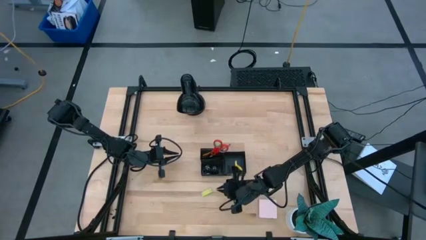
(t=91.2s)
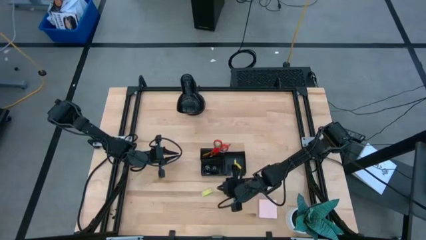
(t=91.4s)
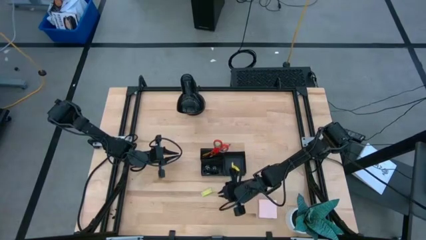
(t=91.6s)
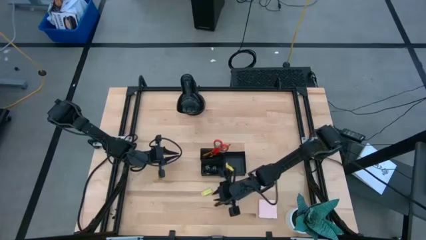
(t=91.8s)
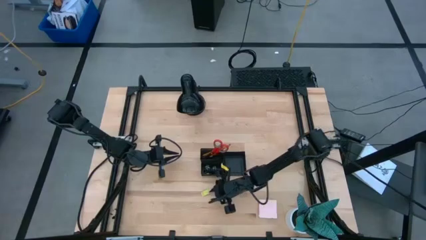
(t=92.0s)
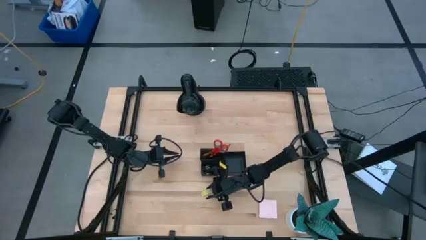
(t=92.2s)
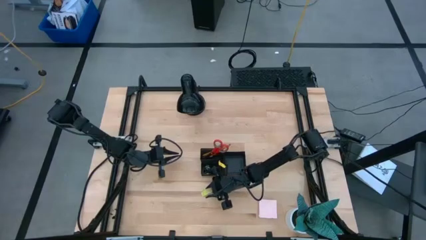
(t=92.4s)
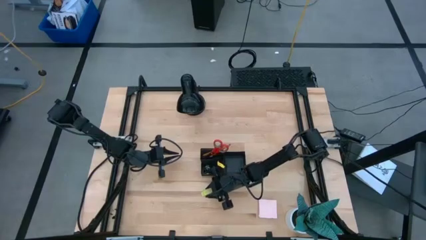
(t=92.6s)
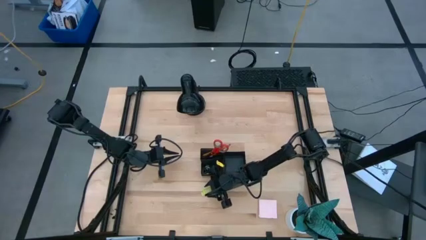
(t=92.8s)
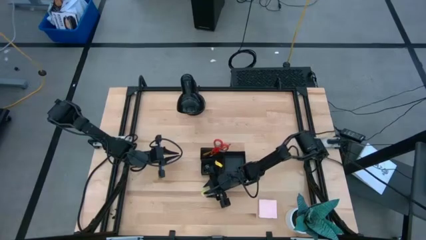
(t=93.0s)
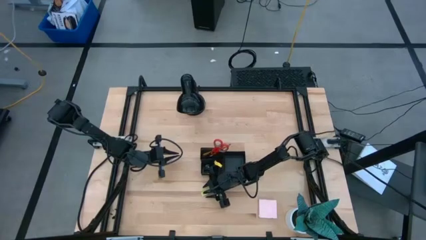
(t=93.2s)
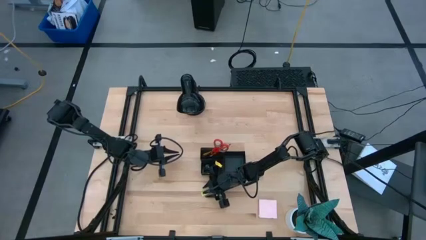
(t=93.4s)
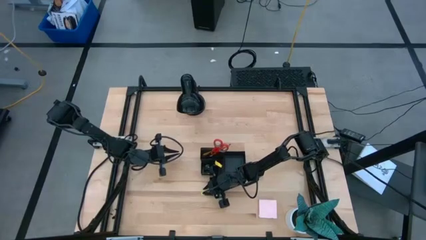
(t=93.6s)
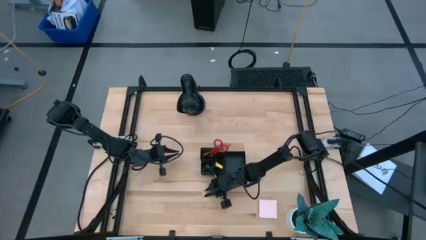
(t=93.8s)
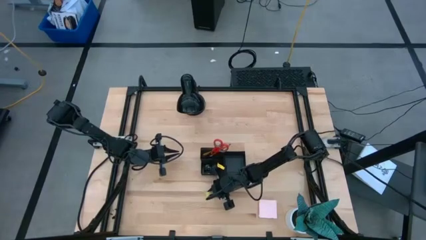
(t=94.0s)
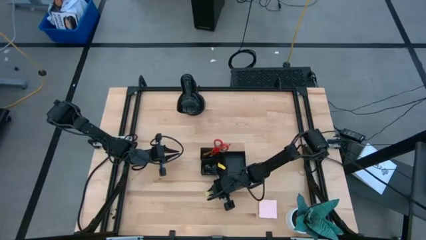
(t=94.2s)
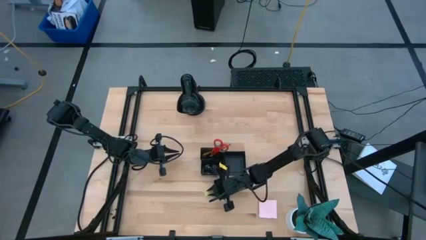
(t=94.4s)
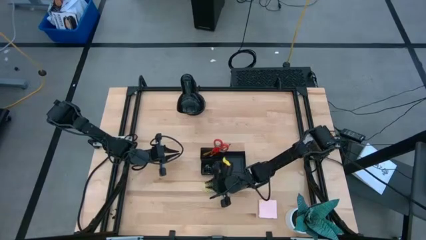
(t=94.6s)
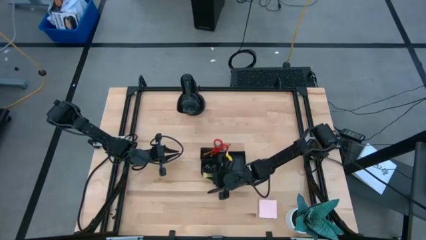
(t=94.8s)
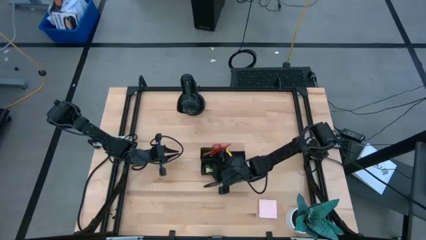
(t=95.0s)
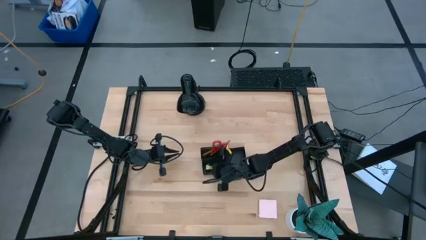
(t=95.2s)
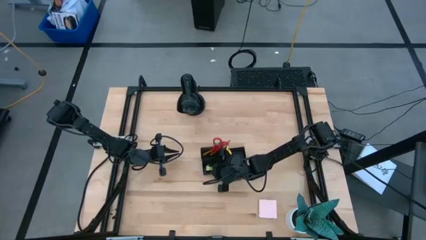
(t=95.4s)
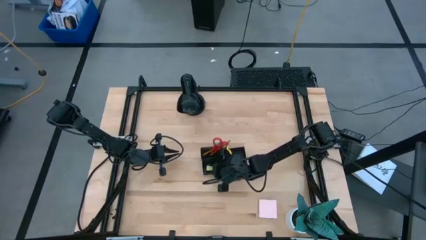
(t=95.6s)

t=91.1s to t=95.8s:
Task: Pick and place office supplies into organizer
Put the eraser into the organizer

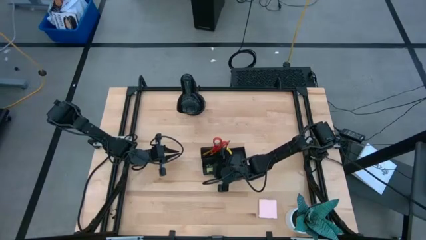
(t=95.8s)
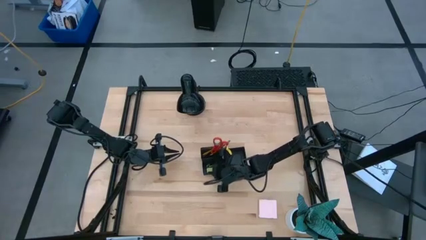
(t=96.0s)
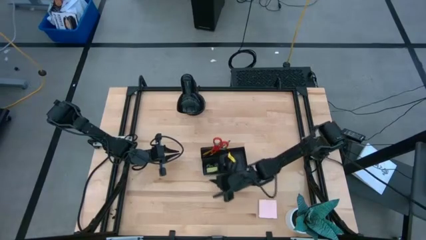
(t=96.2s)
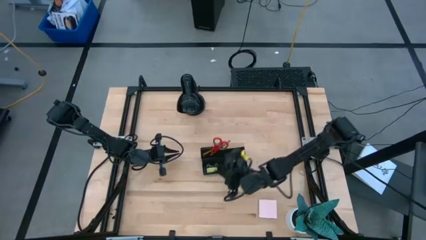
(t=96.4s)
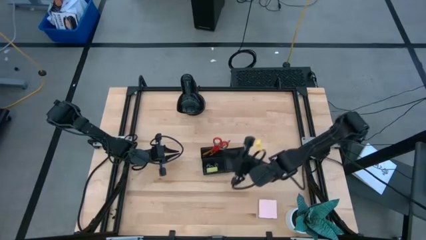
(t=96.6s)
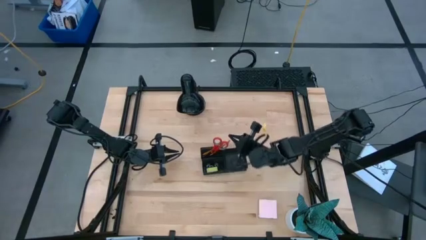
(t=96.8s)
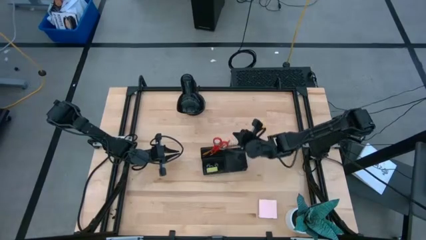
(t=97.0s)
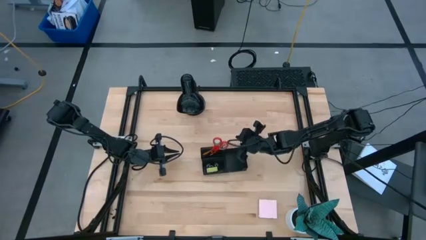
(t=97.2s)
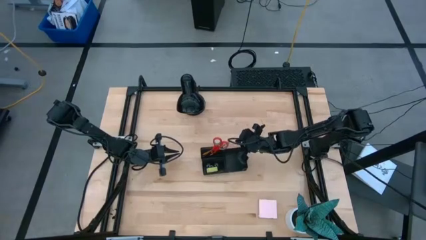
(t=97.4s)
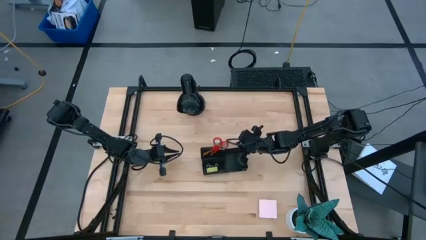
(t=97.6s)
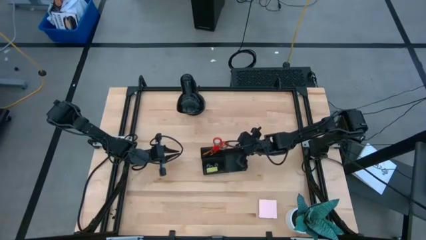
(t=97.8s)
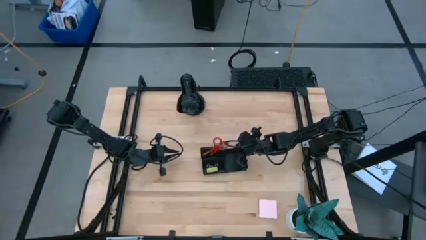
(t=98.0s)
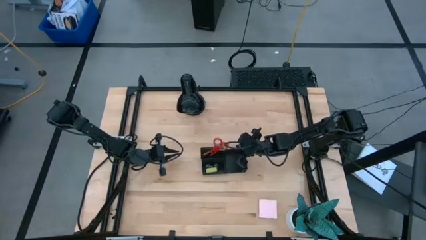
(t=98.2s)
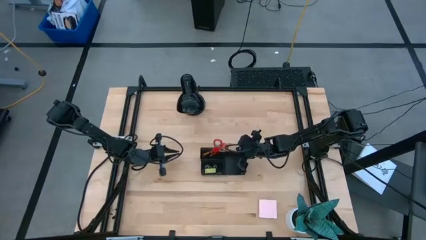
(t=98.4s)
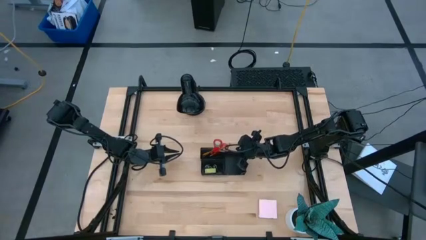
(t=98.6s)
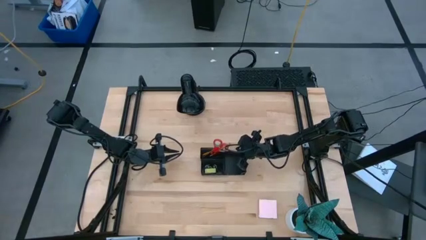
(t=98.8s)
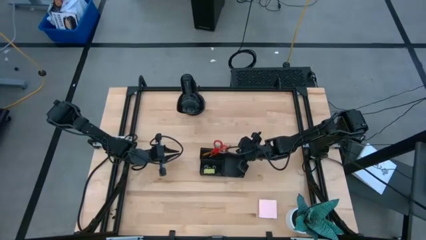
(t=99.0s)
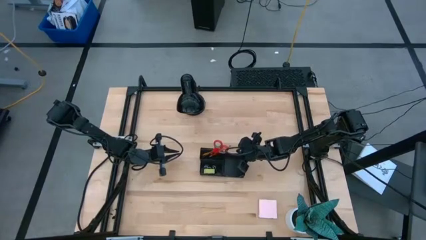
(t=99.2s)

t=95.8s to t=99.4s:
Adjust the desk organizer

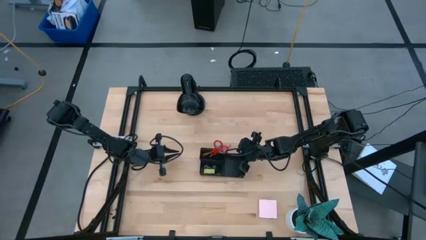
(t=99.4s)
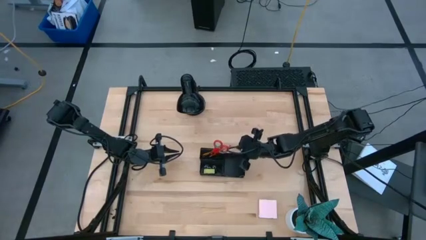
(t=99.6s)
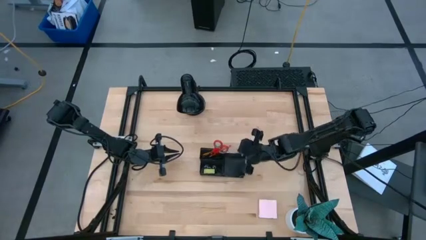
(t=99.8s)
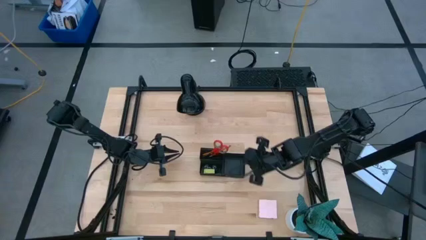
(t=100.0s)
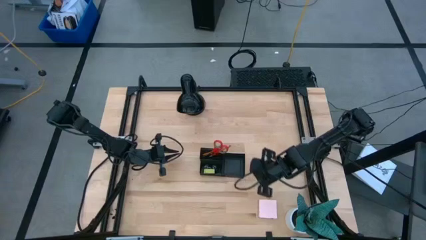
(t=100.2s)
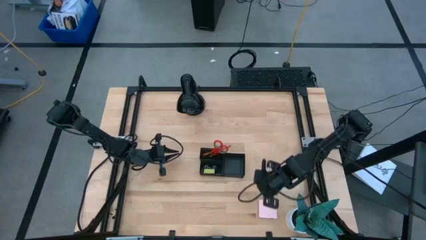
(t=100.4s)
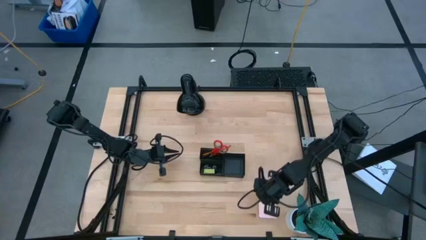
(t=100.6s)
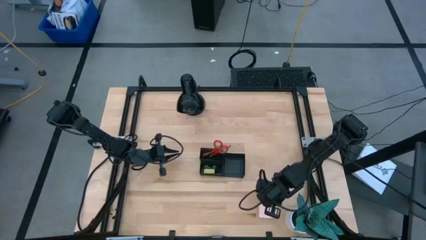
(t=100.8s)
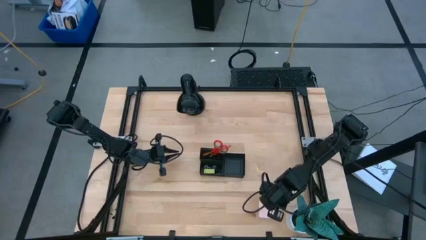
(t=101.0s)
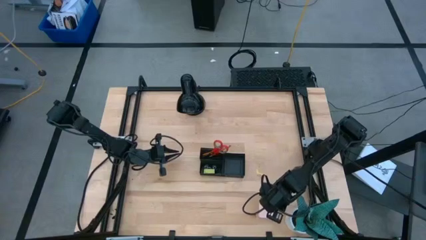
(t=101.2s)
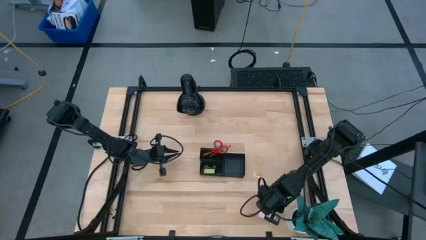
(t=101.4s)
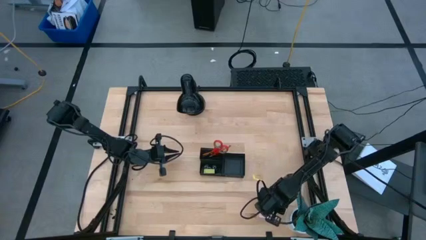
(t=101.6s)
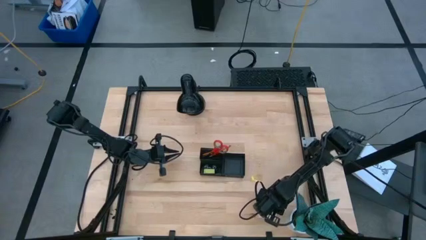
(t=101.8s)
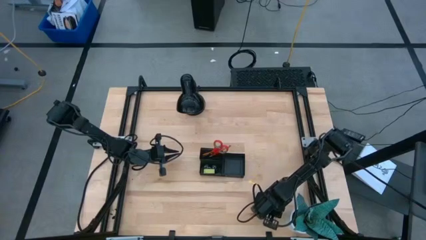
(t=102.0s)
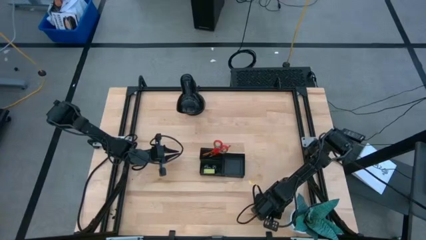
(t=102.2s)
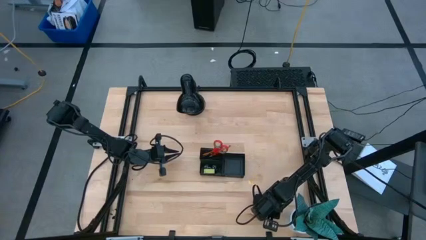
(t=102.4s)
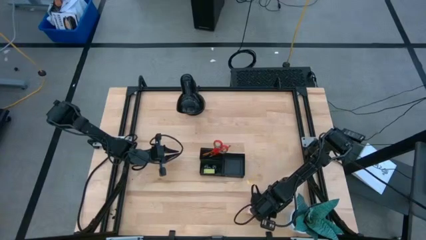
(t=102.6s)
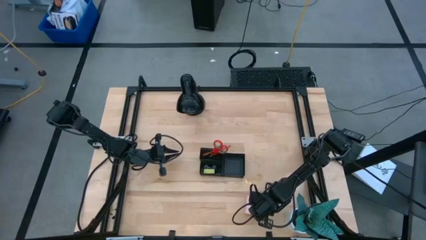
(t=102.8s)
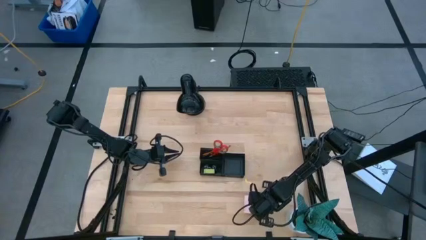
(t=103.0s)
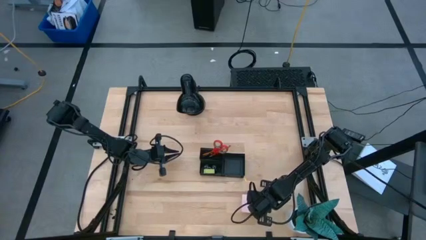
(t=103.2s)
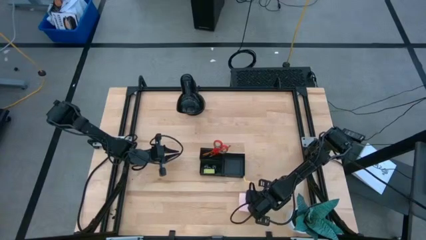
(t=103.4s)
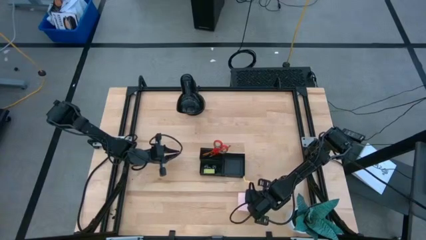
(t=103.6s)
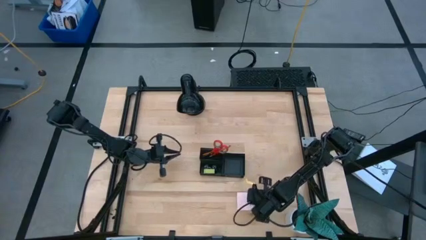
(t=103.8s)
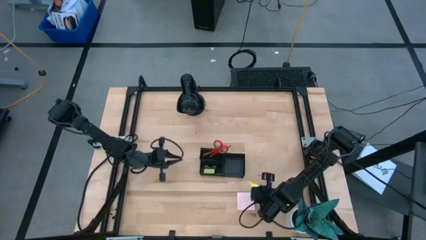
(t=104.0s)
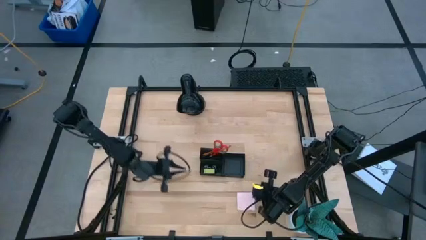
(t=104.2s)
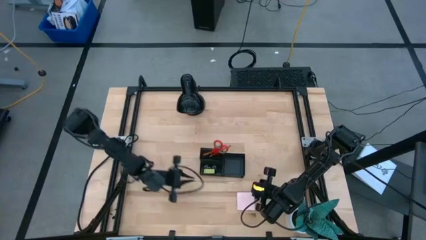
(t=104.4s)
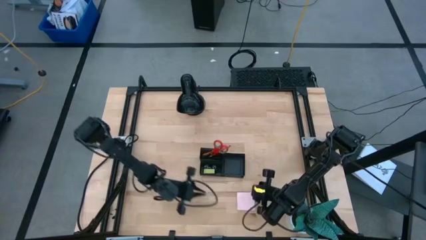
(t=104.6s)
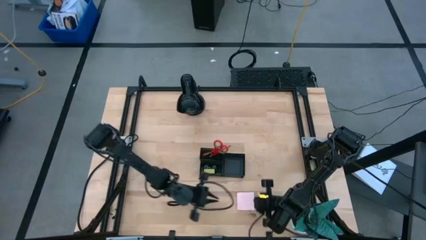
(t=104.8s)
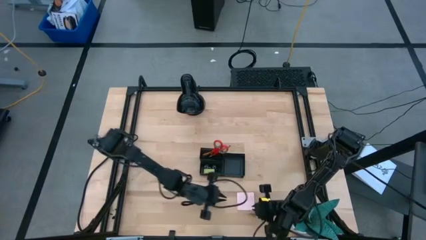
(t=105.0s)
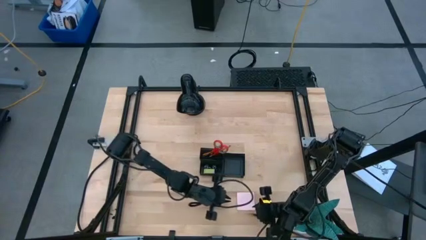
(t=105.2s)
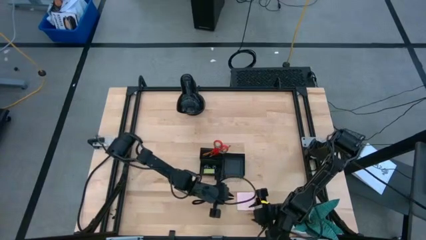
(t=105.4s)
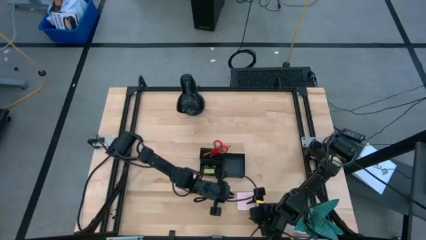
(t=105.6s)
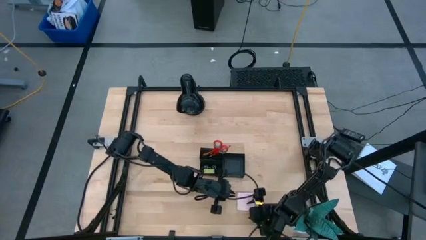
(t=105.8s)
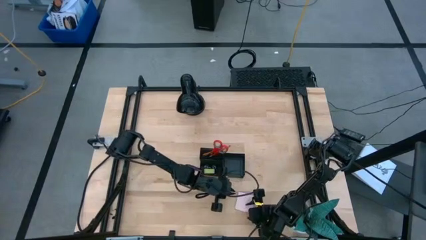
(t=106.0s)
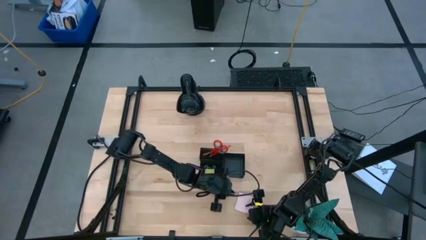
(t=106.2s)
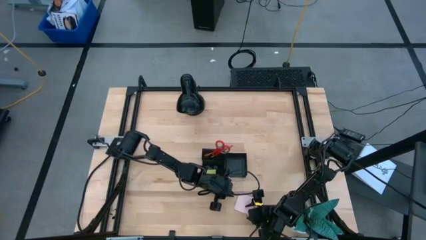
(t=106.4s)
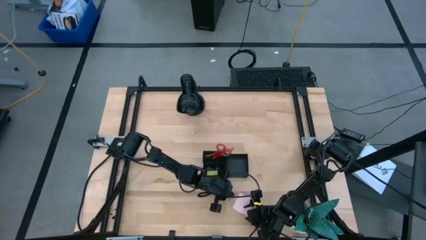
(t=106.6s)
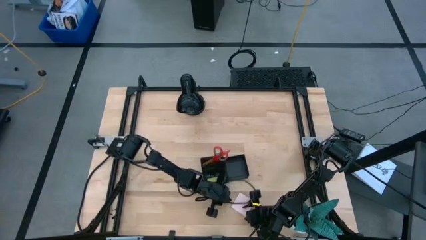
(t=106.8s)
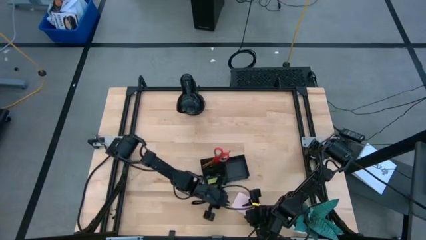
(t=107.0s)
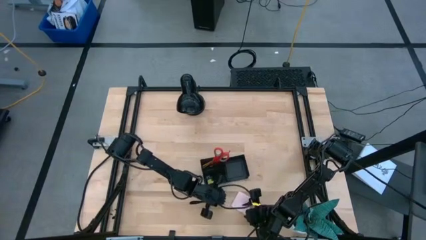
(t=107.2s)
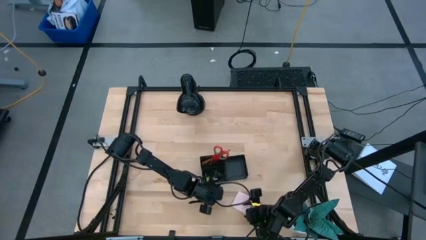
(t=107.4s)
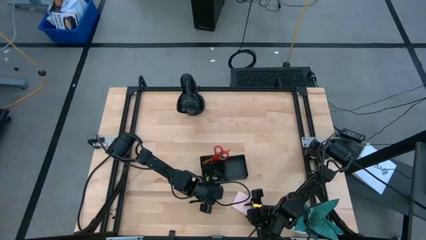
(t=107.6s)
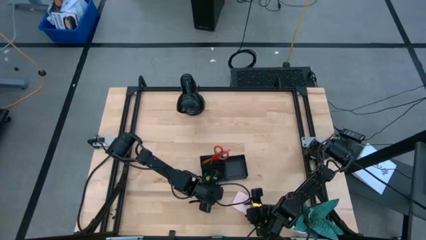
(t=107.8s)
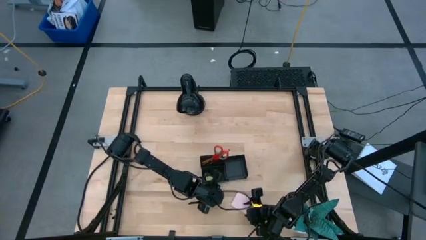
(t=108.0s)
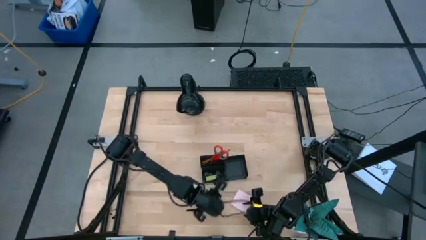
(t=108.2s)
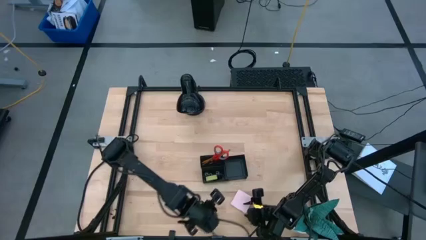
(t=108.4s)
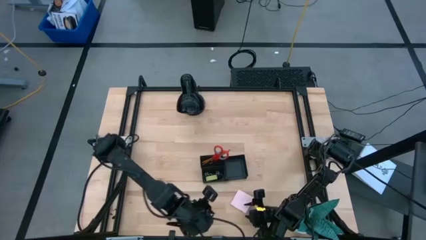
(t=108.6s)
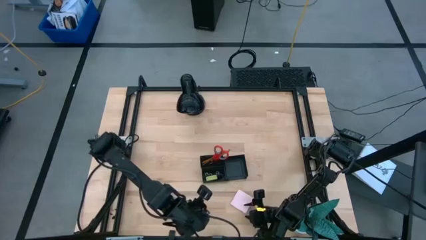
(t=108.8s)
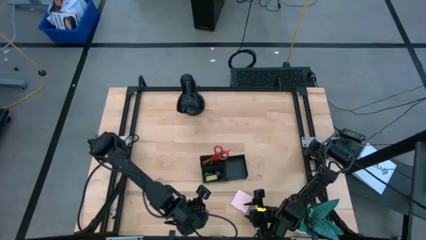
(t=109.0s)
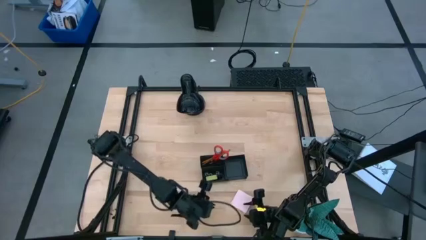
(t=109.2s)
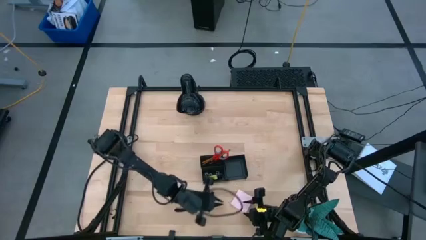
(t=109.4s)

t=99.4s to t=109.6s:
Put the sticky note into the desk organizer
